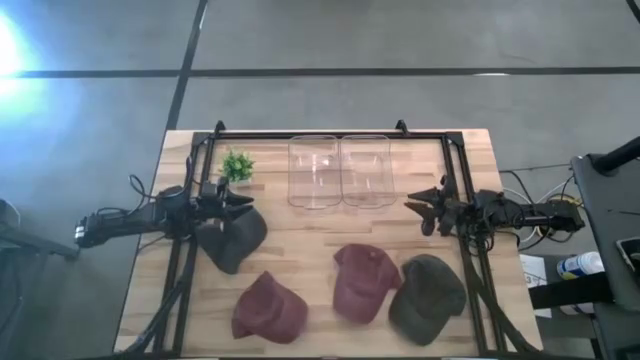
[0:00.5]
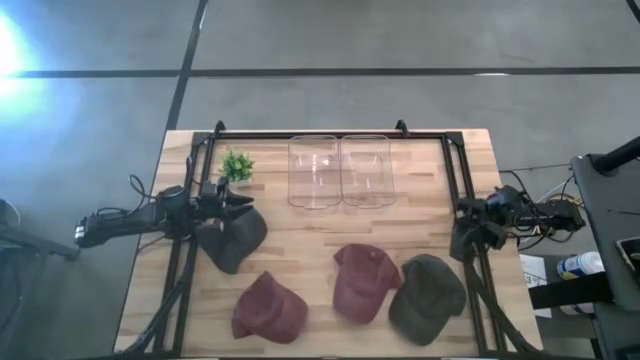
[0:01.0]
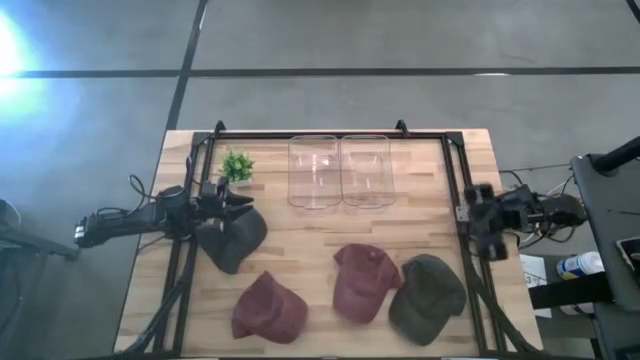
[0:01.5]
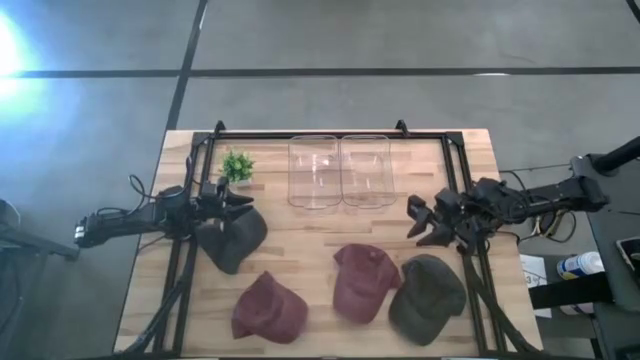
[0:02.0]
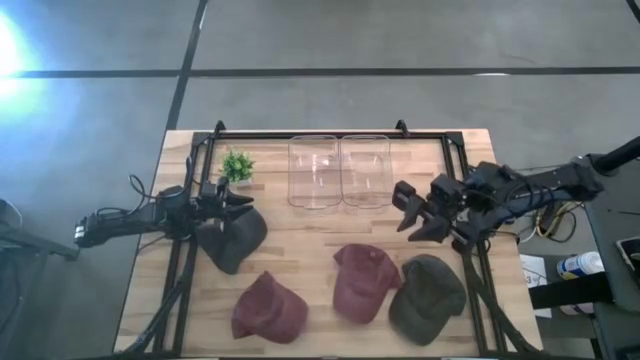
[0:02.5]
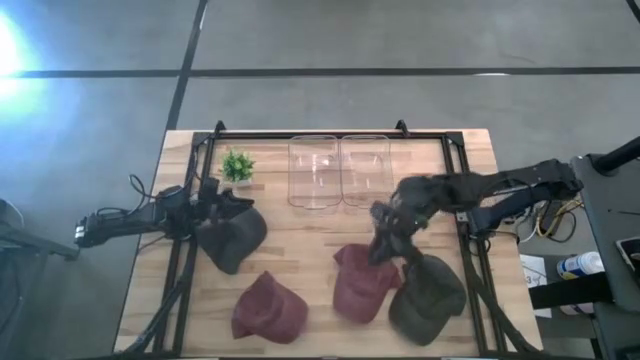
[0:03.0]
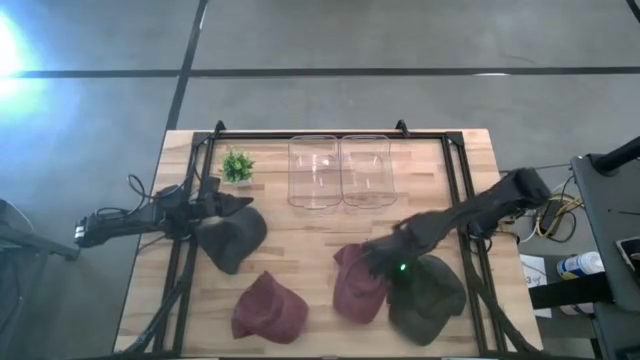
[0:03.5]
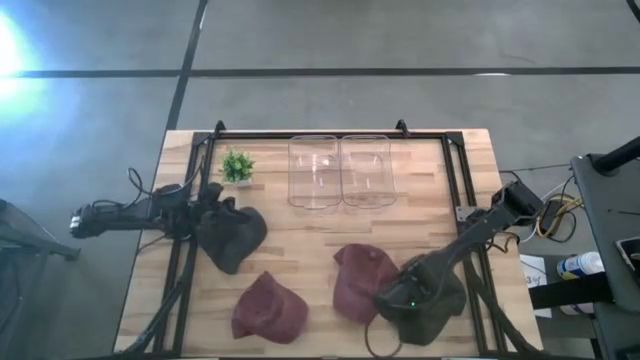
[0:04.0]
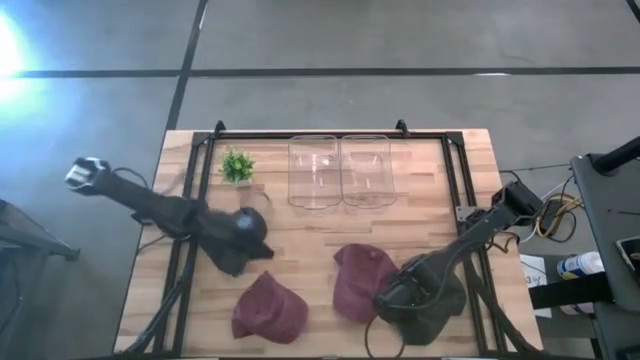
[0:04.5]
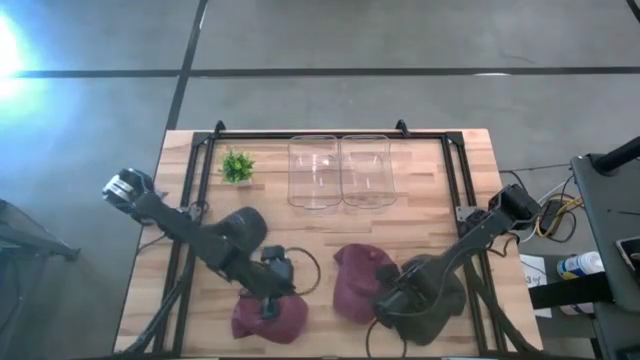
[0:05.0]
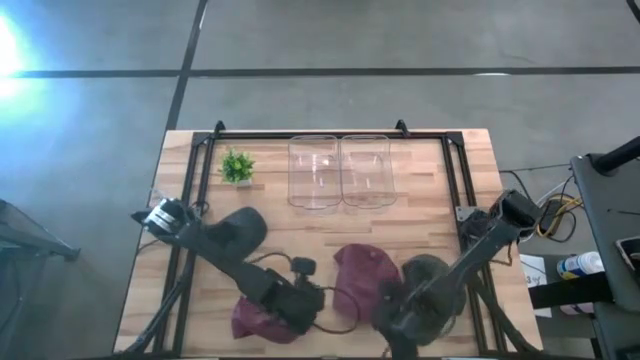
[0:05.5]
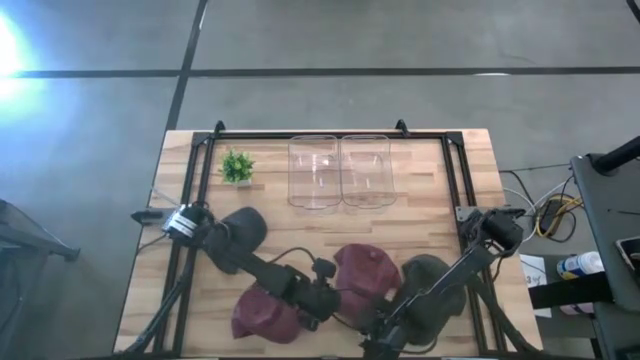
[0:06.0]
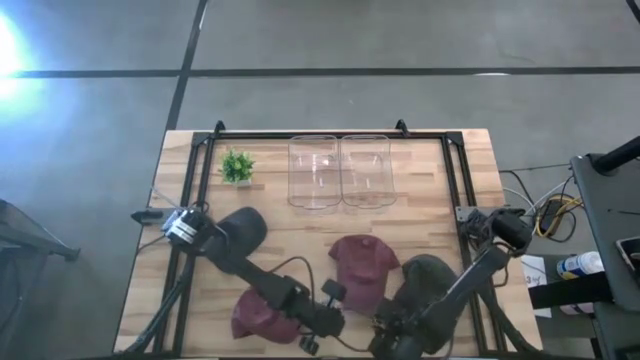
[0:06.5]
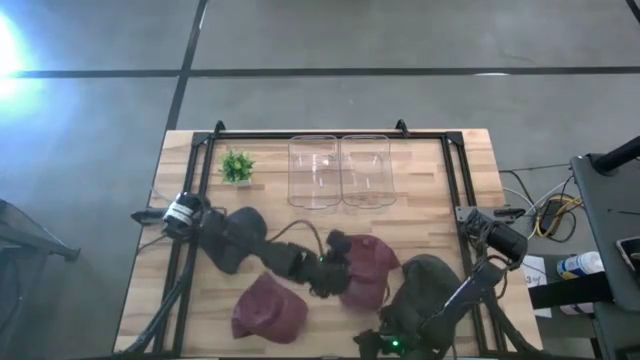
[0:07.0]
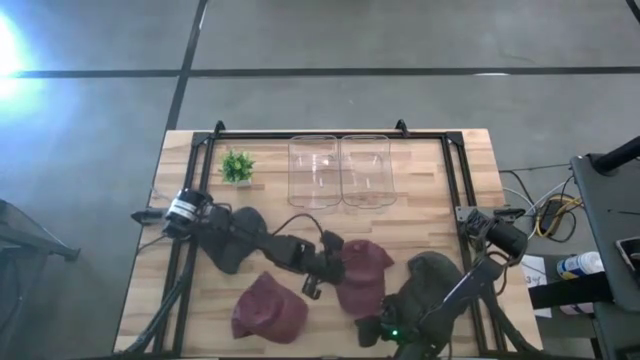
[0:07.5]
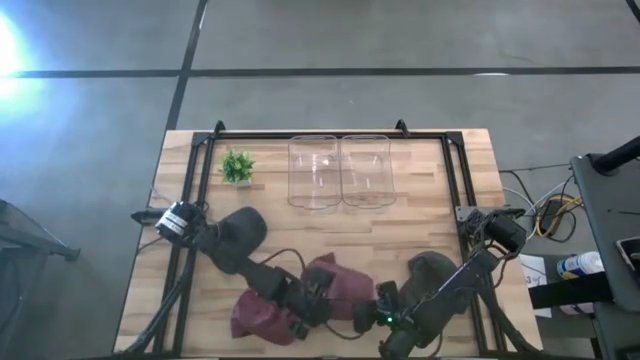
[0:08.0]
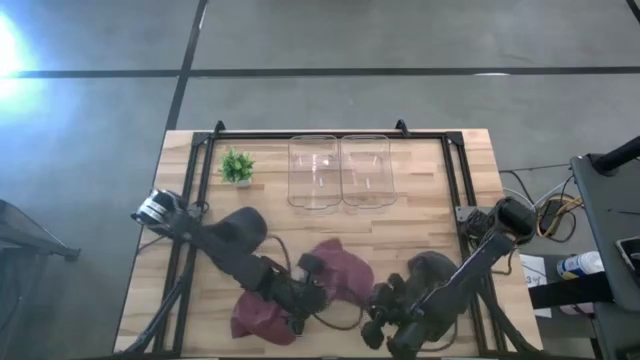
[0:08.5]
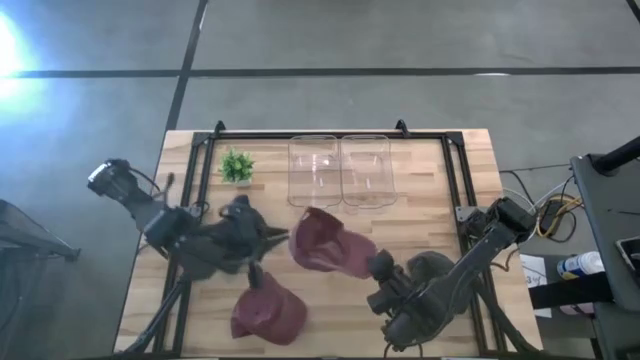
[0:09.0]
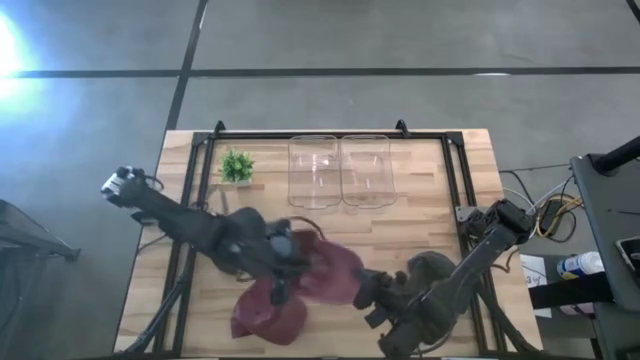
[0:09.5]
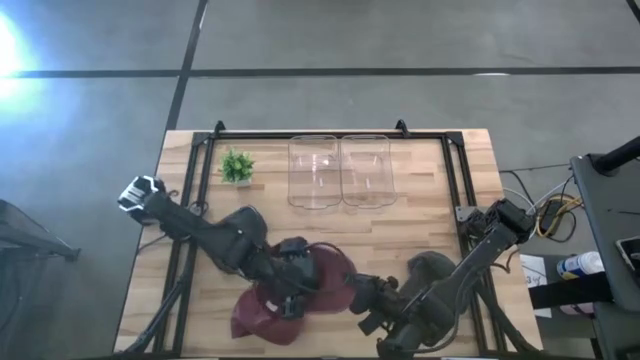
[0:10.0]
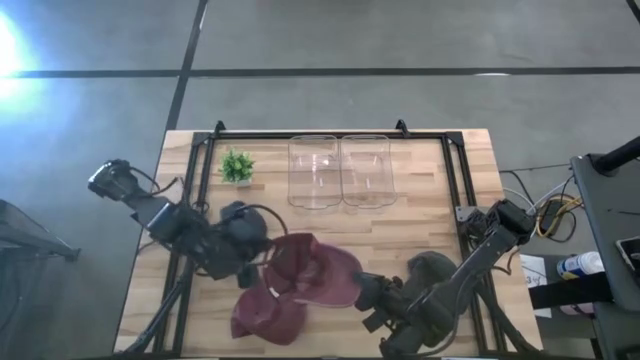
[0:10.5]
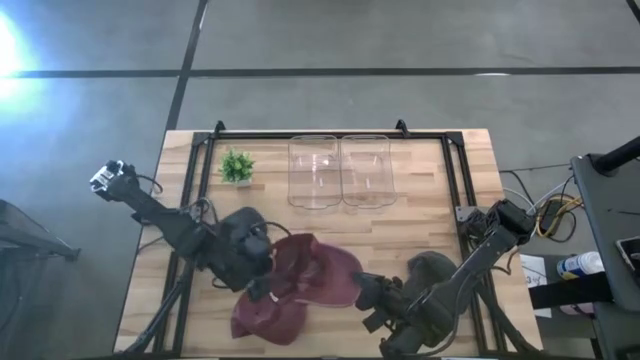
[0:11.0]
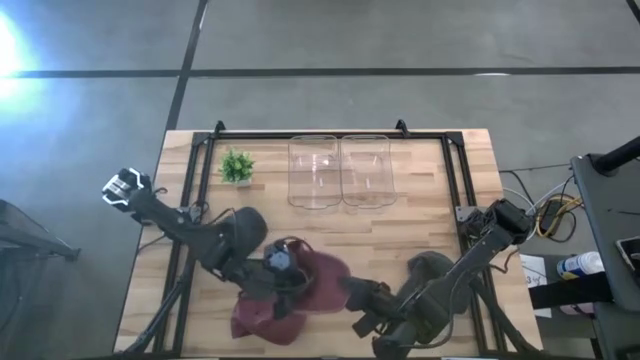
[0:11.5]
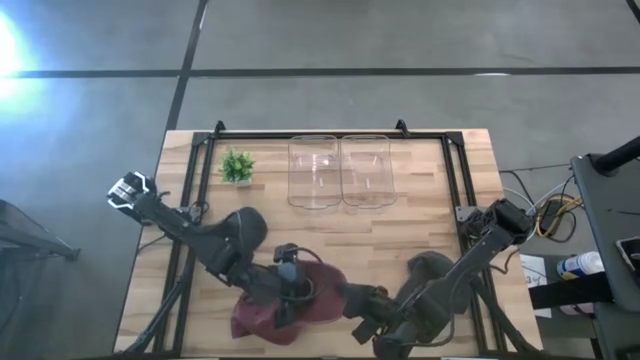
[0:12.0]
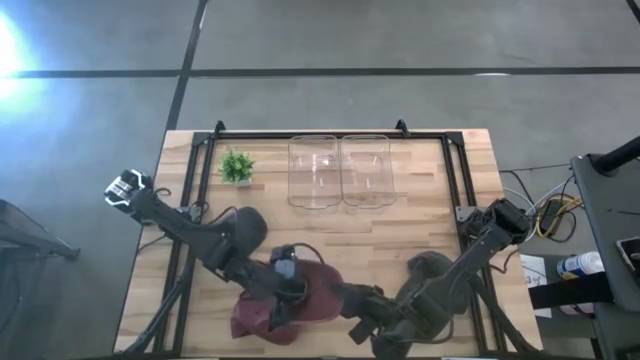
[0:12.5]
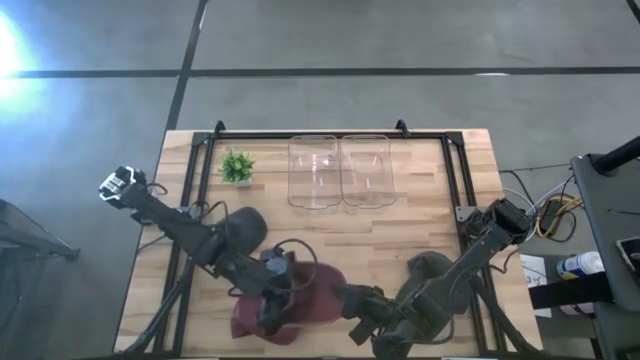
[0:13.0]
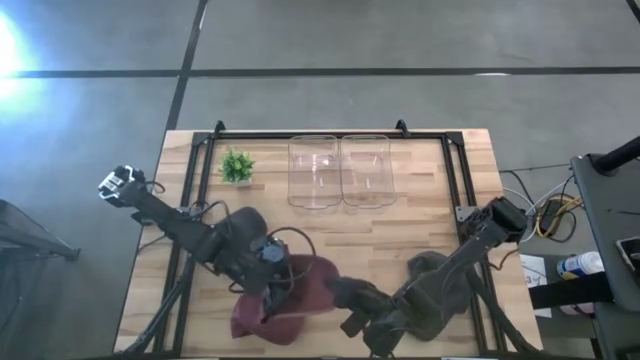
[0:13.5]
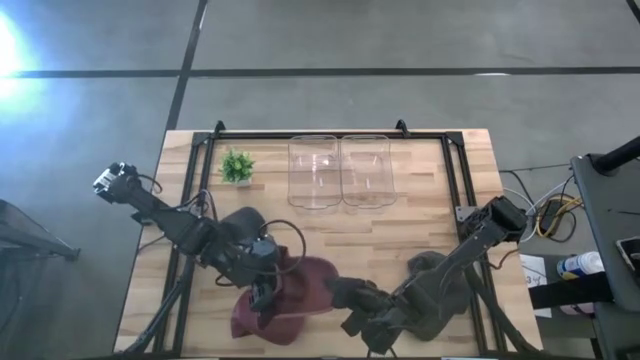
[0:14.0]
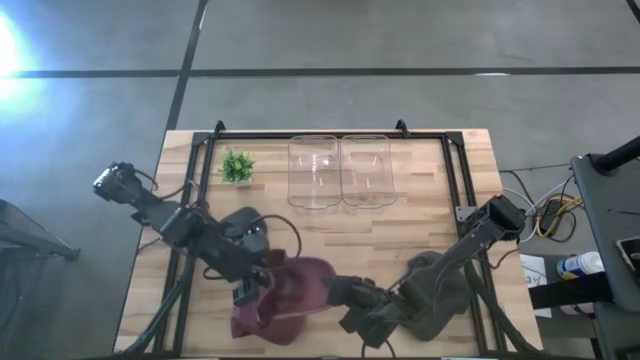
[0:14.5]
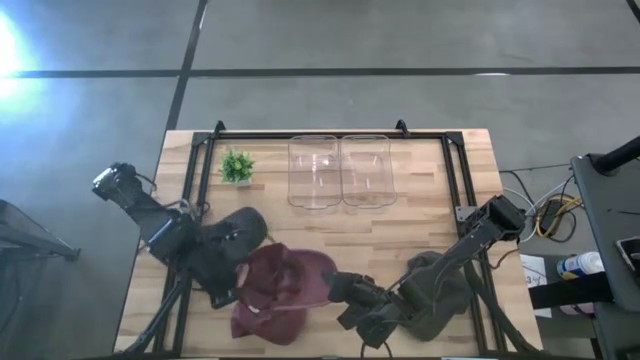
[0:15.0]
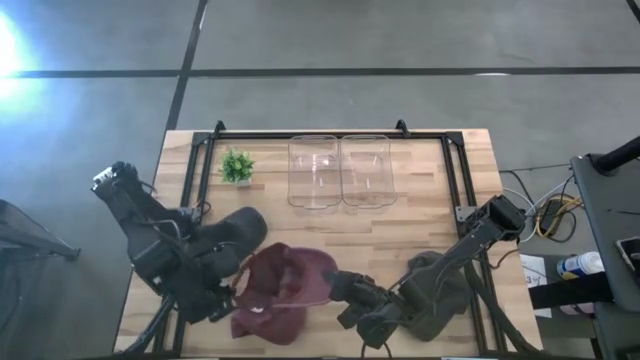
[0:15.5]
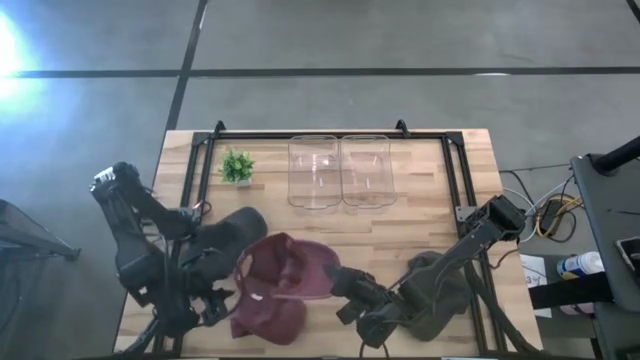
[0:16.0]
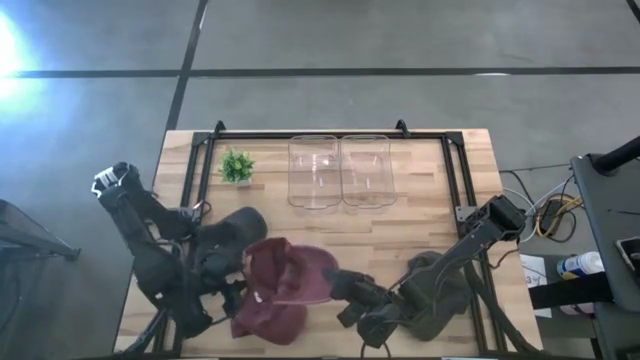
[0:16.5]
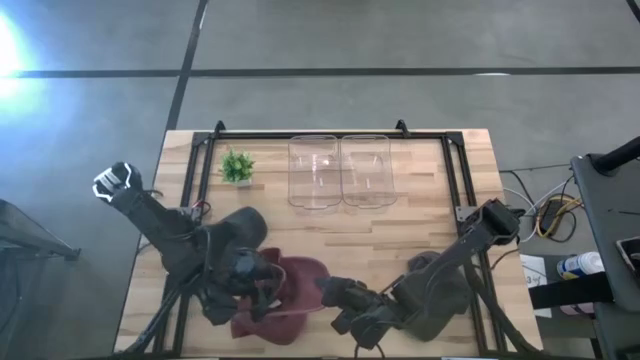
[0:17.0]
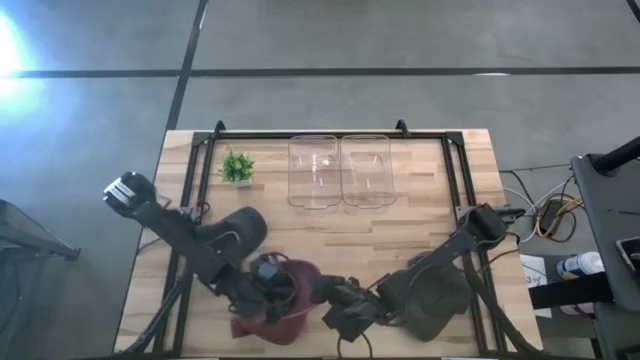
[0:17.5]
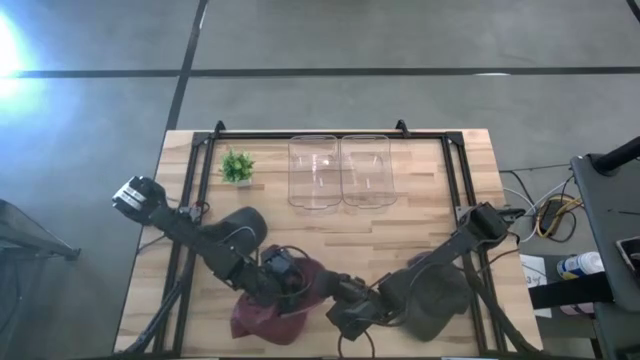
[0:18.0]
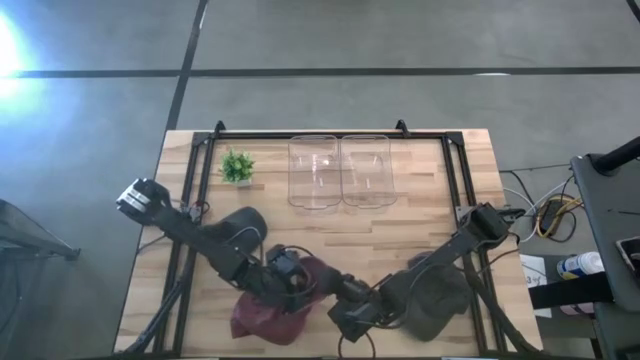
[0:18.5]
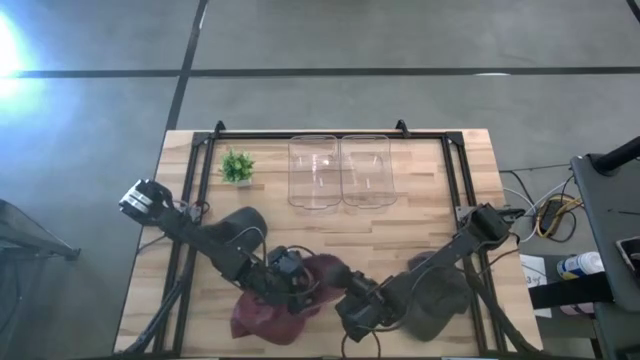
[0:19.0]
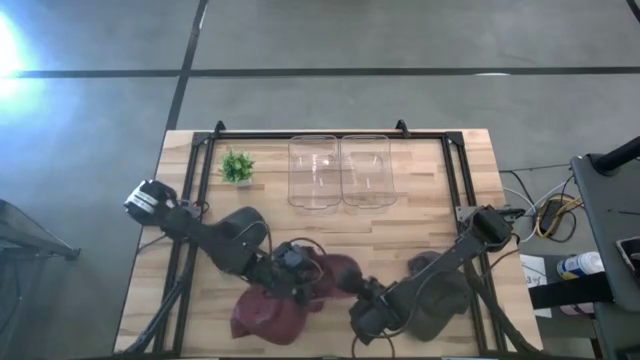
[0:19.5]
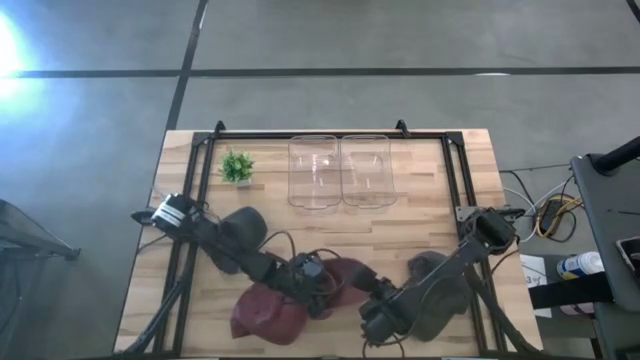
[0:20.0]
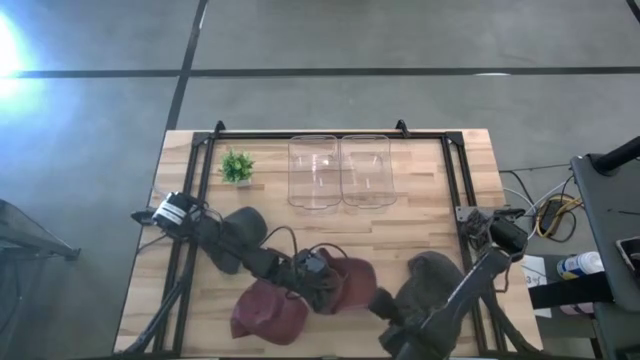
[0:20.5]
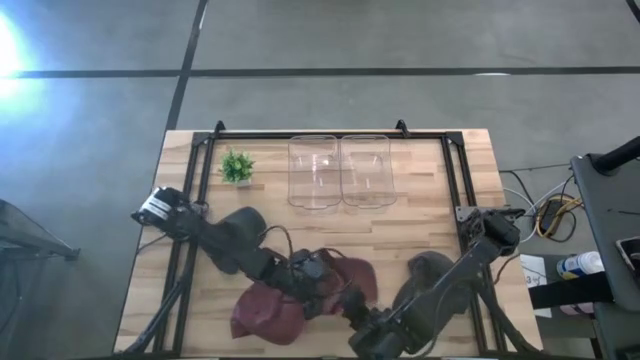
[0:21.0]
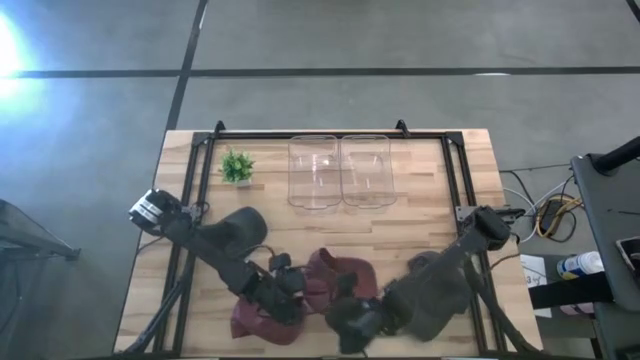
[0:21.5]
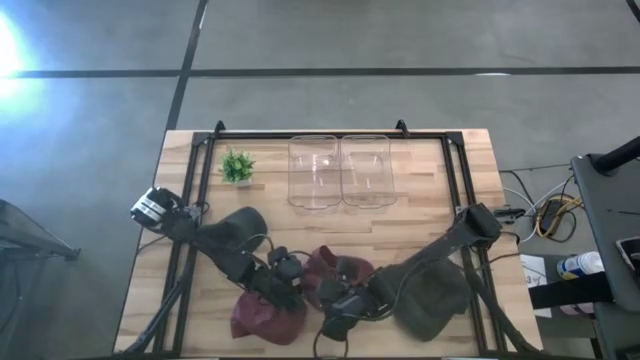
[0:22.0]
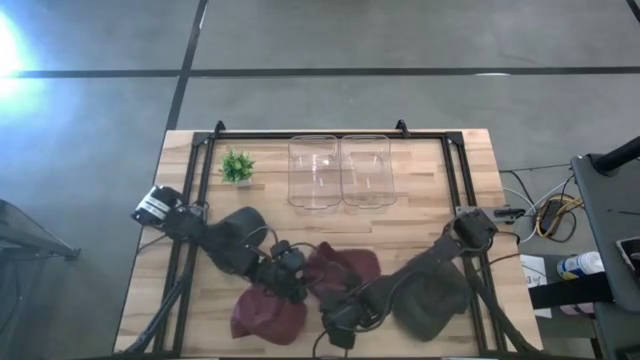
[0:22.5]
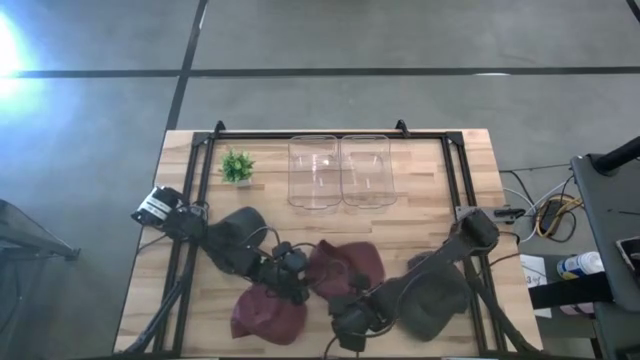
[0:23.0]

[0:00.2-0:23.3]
Task: Pick & Place hat
Put the right red cap into the right transparent bin
